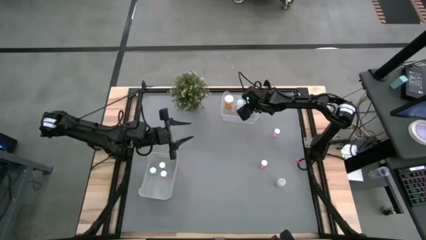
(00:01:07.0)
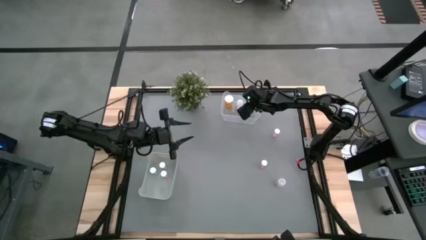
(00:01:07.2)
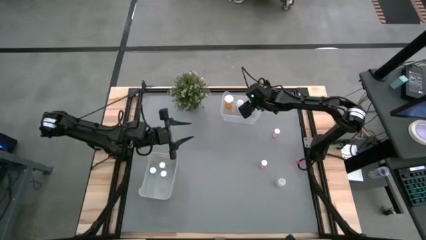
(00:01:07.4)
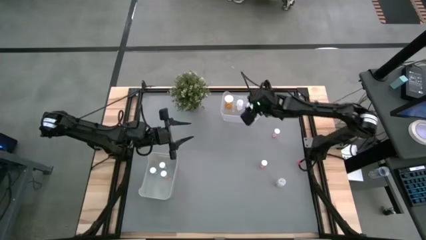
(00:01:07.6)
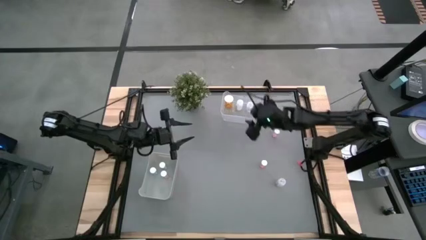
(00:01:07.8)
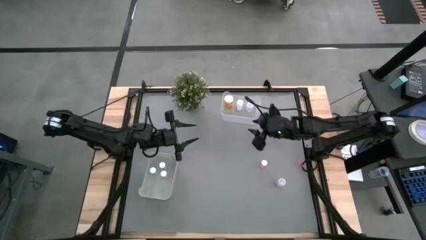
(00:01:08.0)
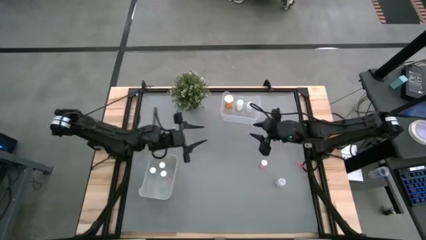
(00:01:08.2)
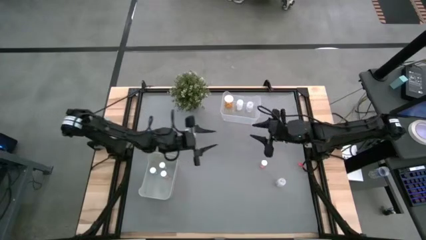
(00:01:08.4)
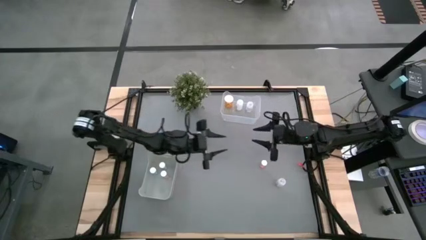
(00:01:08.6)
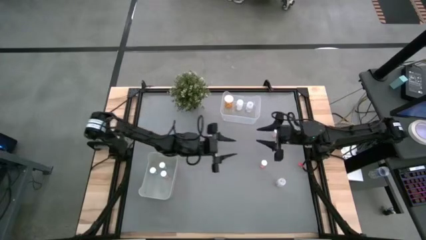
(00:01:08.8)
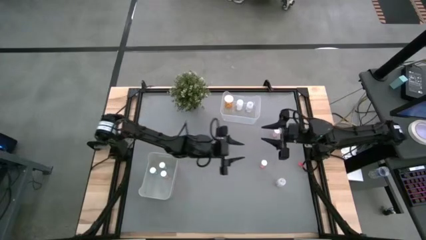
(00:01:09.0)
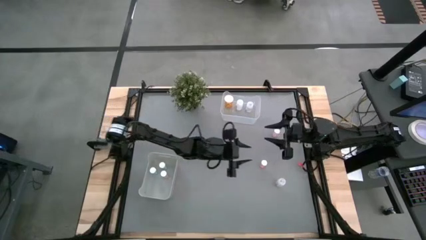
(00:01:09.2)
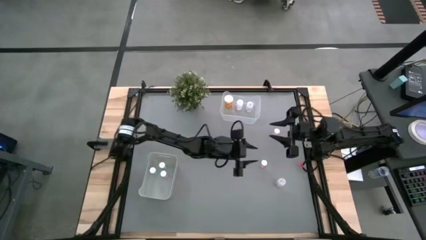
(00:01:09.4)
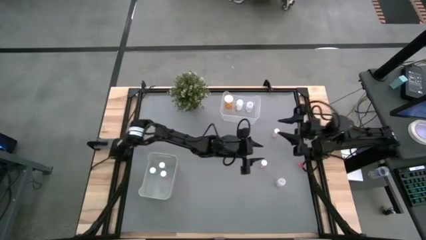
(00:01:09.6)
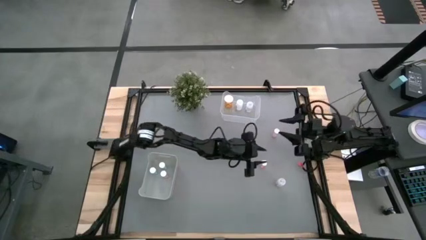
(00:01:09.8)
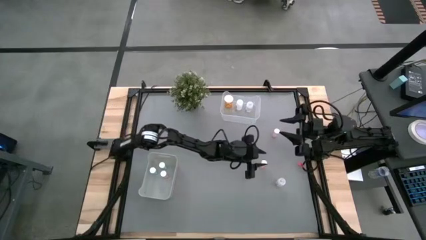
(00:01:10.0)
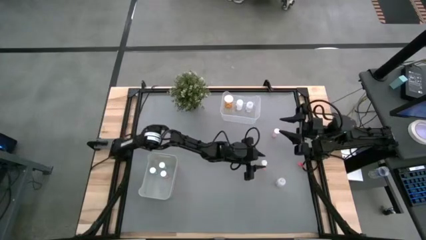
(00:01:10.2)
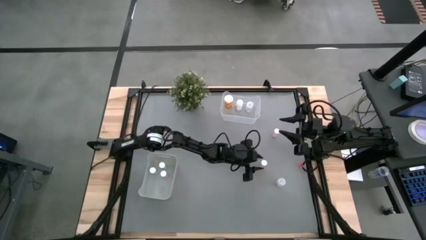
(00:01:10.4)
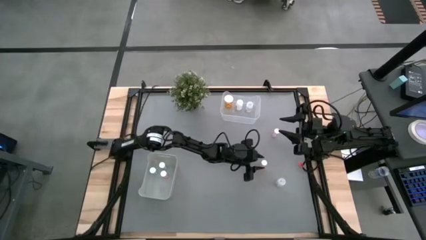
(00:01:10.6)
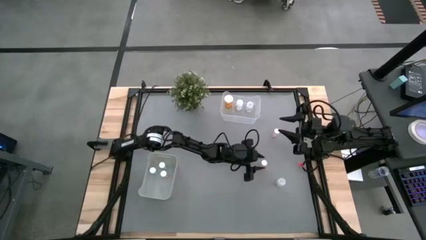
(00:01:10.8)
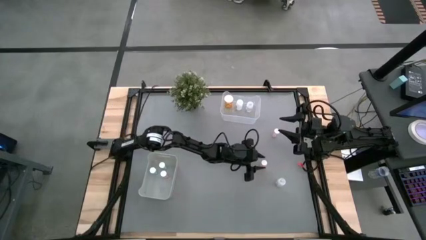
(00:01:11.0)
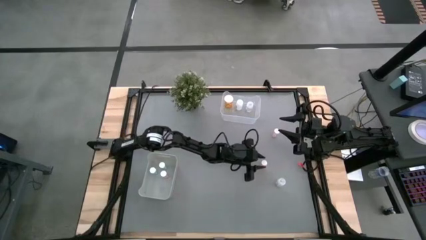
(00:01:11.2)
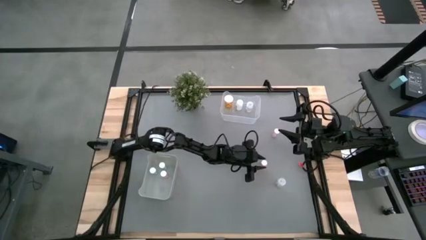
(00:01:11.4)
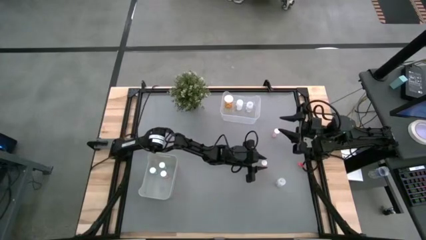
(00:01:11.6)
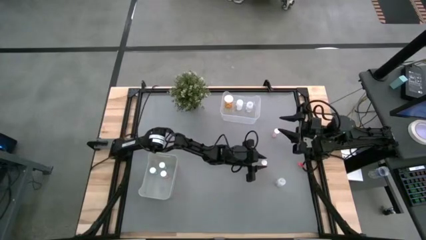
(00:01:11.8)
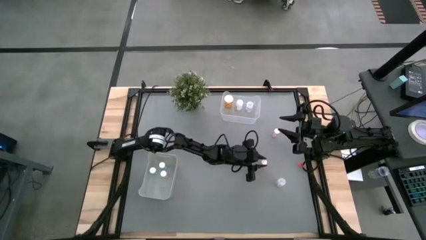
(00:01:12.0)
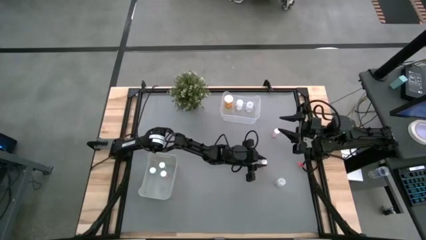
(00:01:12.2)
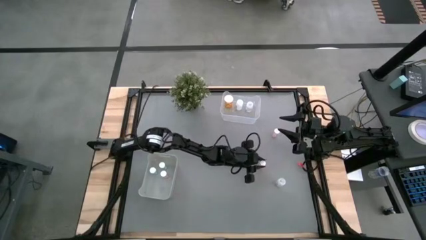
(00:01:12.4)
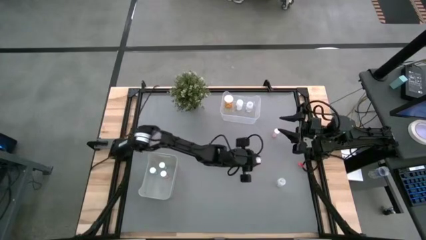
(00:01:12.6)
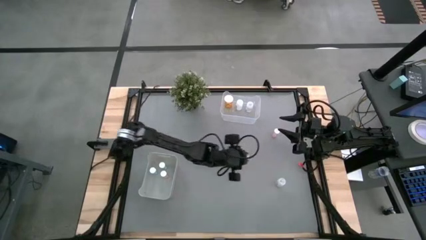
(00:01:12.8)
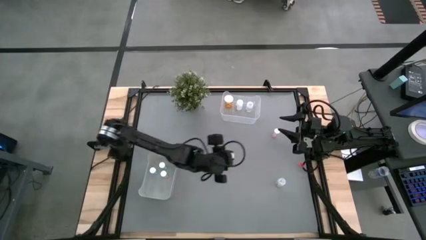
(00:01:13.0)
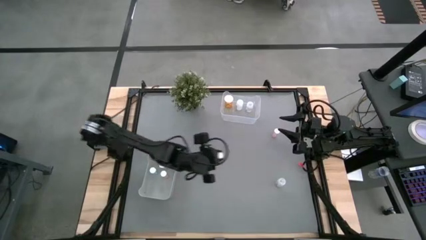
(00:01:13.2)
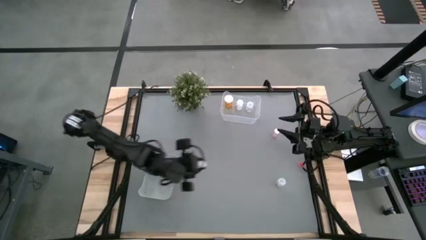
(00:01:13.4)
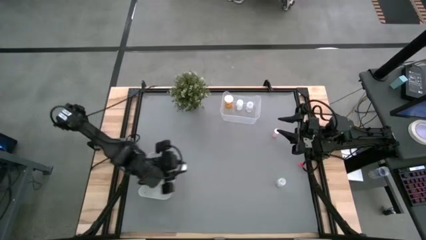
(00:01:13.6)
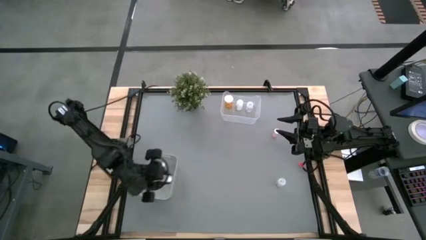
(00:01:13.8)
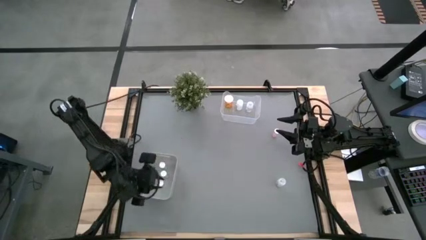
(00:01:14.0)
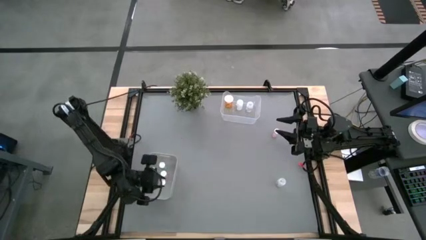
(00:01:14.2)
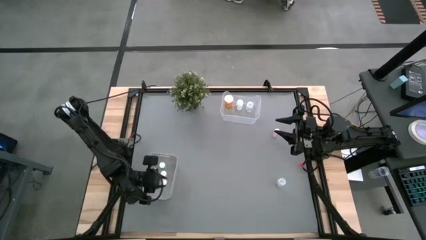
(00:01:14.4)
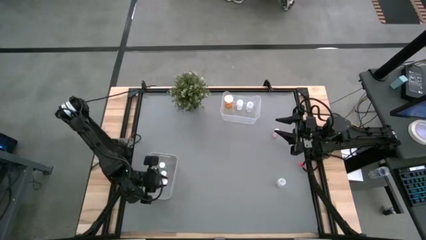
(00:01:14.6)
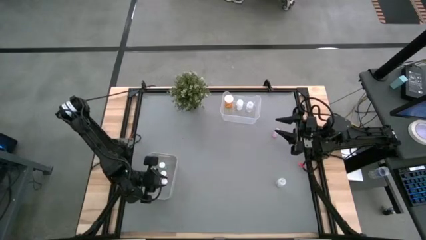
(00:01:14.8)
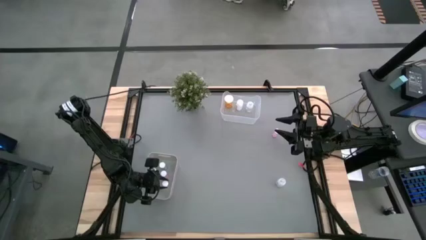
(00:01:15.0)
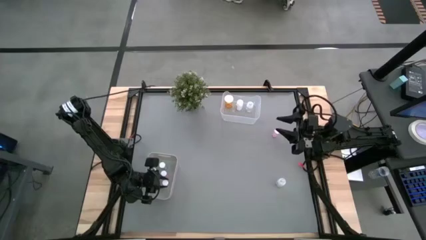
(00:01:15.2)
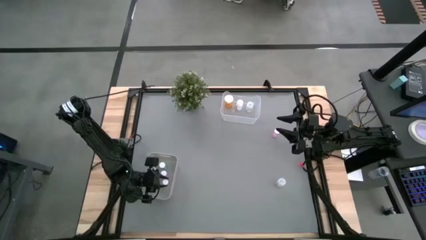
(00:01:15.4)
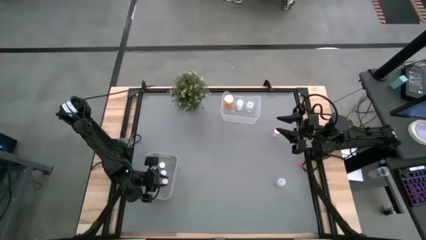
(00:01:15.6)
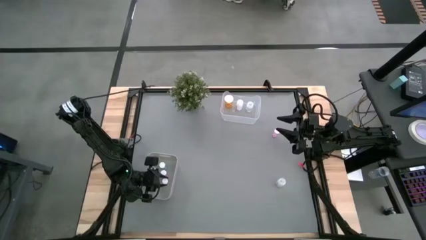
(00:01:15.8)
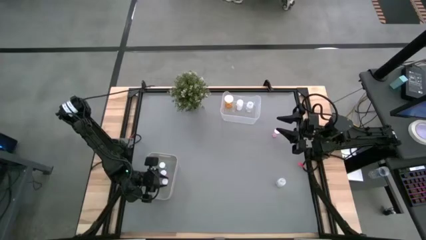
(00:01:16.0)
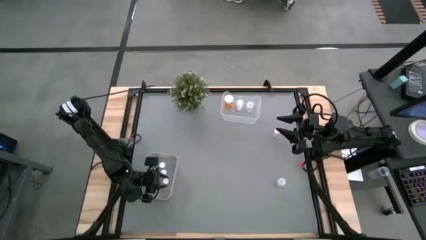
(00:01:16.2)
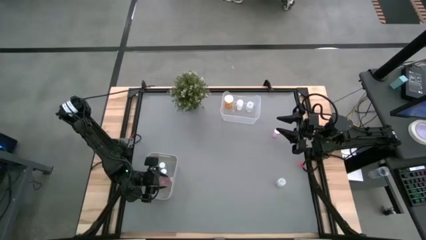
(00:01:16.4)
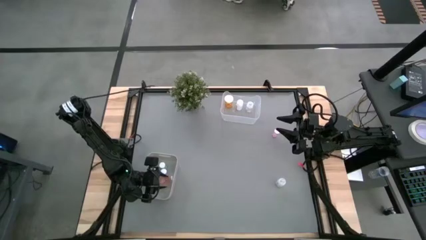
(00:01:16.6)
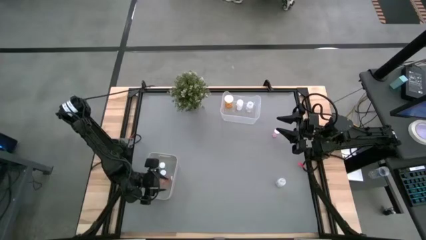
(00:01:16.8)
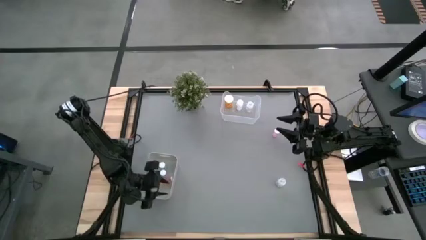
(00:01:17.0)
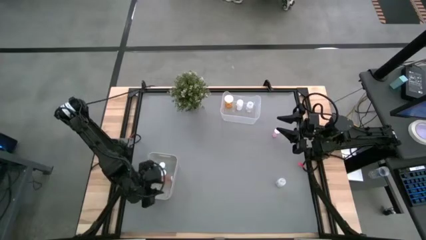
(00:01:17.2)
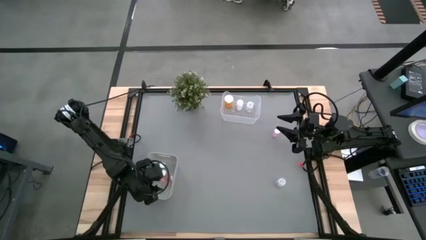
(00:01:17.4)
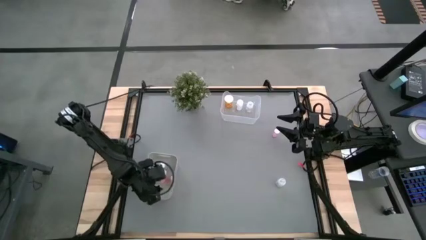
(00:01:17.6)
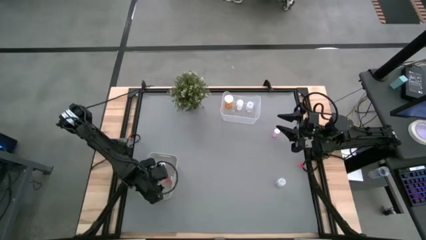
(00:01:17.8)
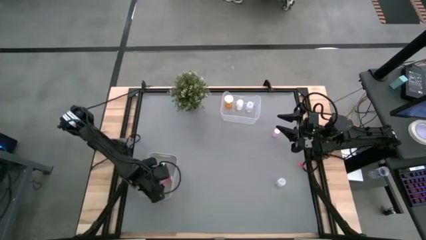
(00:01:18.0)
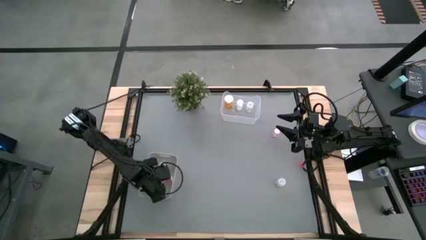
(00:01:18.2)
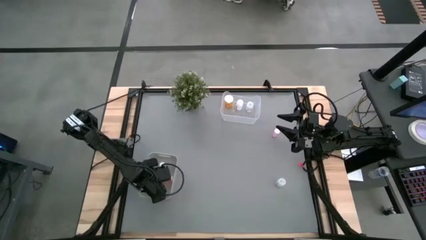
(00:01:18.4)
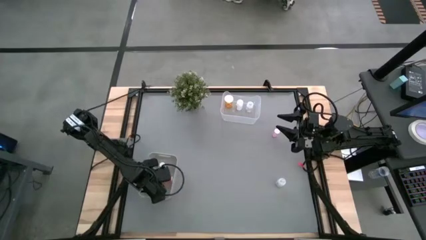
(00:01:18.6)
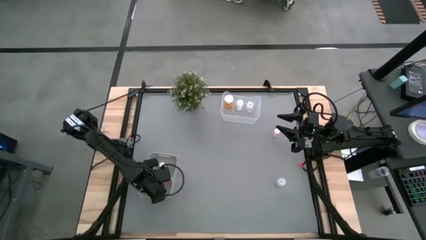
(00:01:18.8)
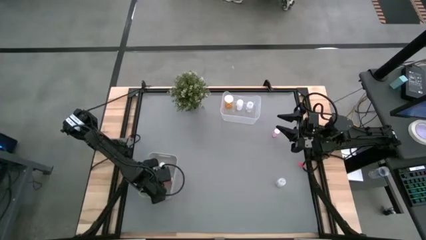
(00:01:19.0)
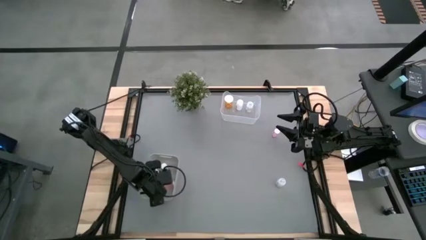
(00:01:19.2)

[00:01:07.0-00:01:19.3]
Task: Pick and place medicine bottles into bin by pill shape (circle, oval)
Put the bottom pink tablet bottle into the gray bin
